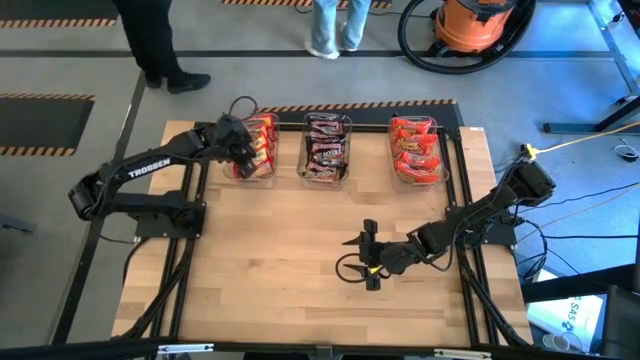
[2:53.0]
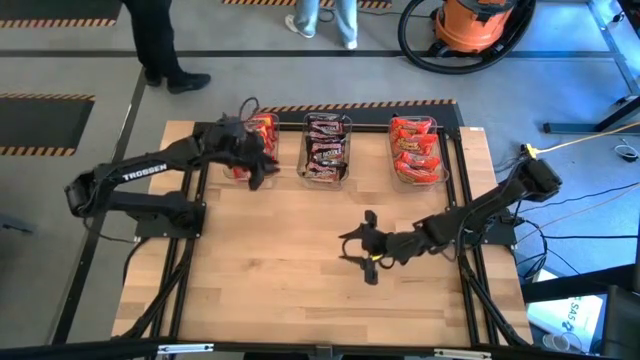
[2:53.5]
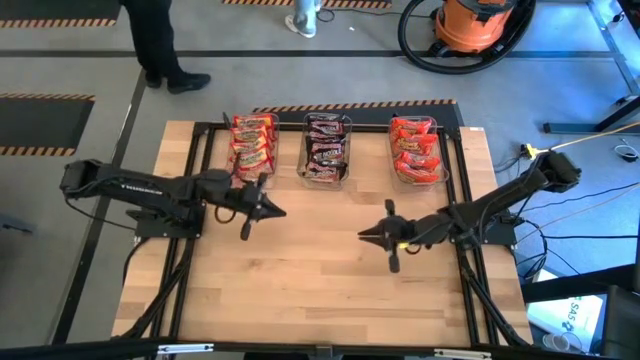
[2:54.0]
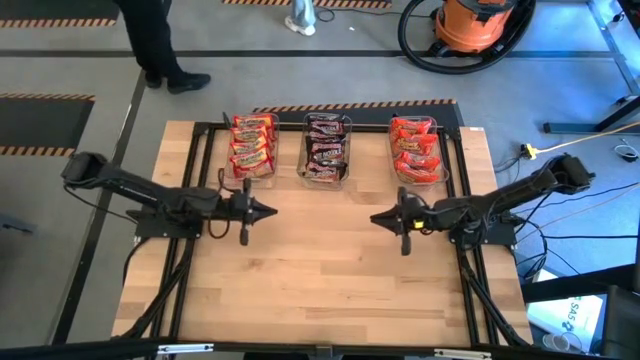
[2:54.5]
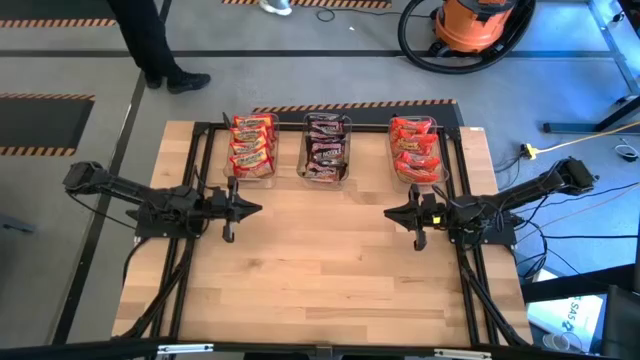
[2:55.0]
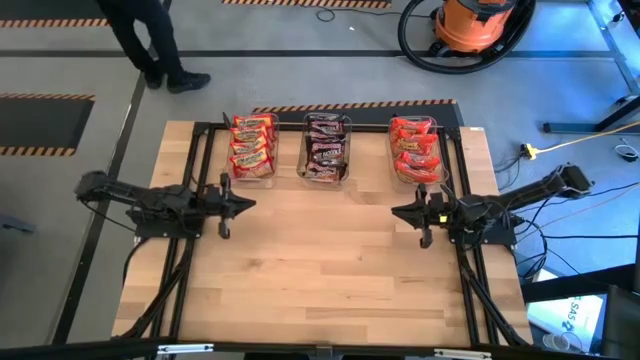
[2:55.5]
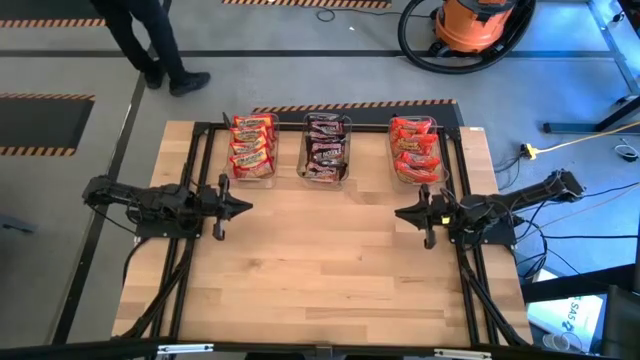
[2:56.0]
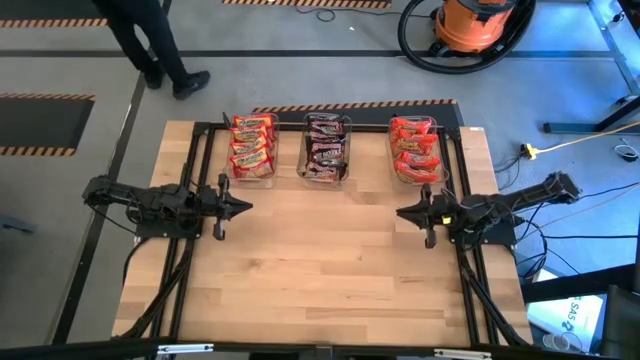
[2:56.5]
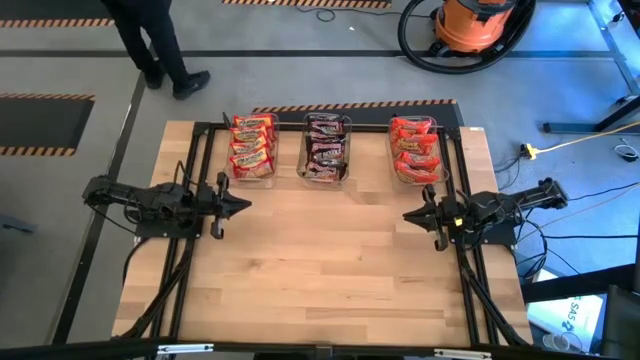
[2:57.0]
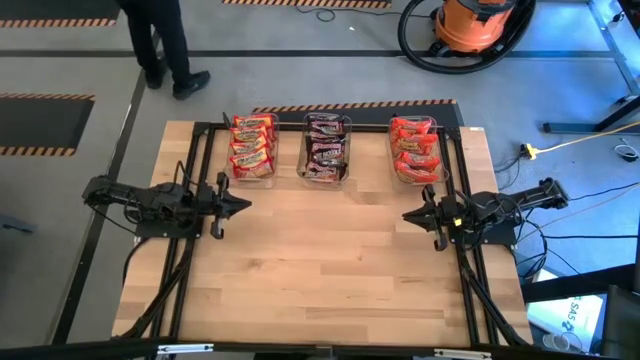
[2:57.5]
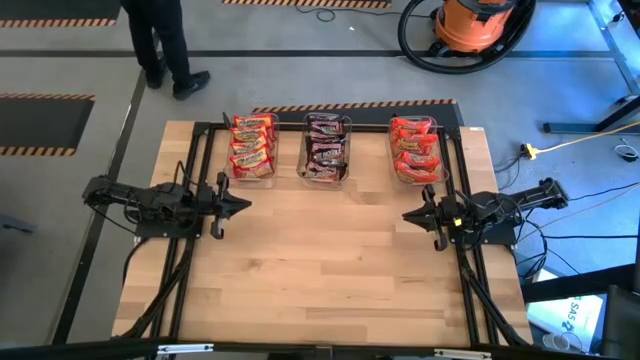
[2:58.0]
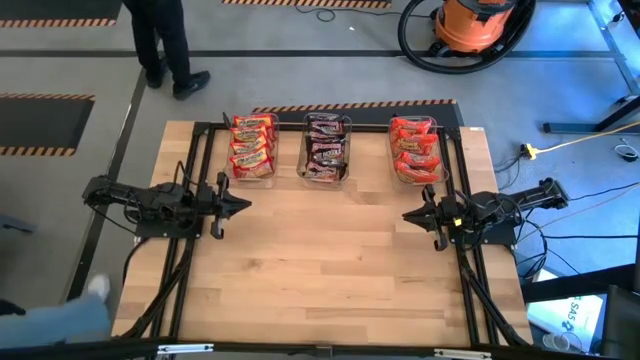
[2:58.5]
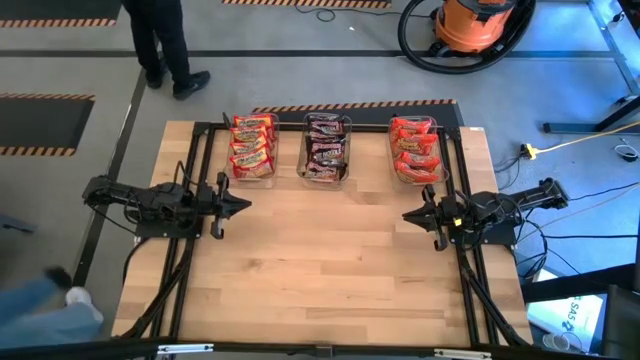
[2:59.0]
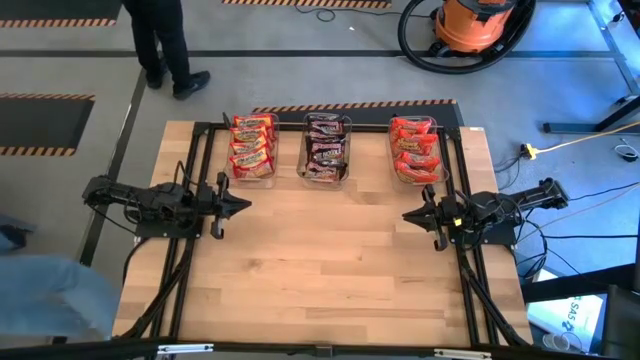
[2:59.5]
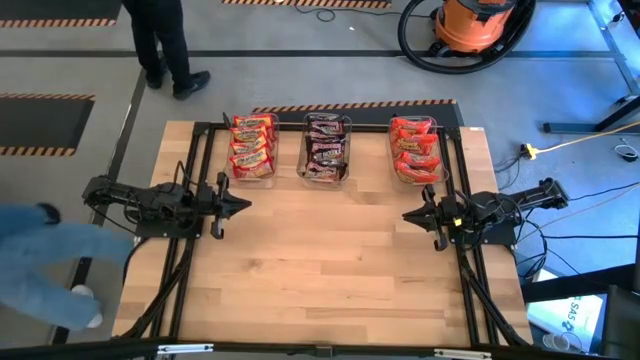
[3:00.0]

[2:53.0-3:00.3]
Task: Sort Maruchan noodles
Return to Home Position

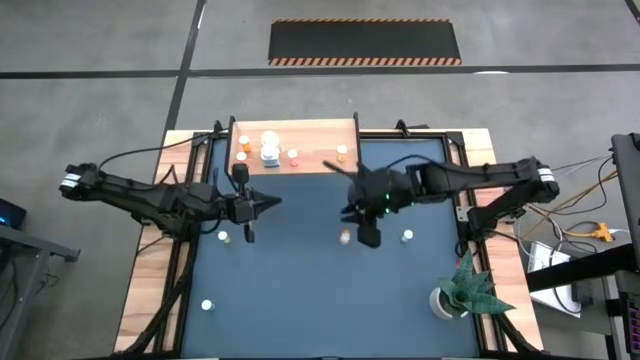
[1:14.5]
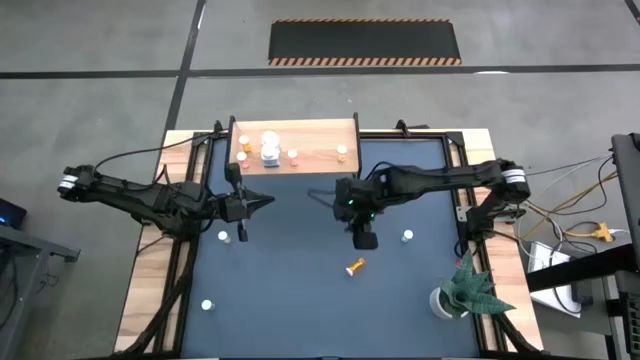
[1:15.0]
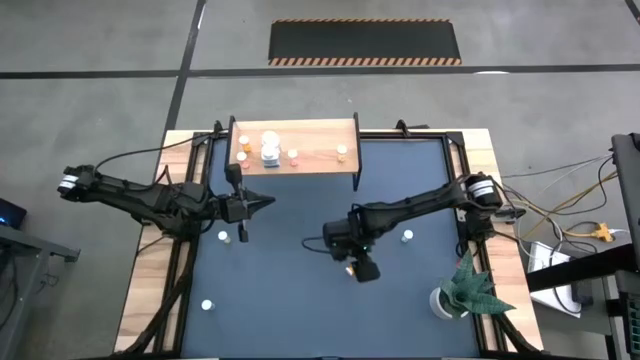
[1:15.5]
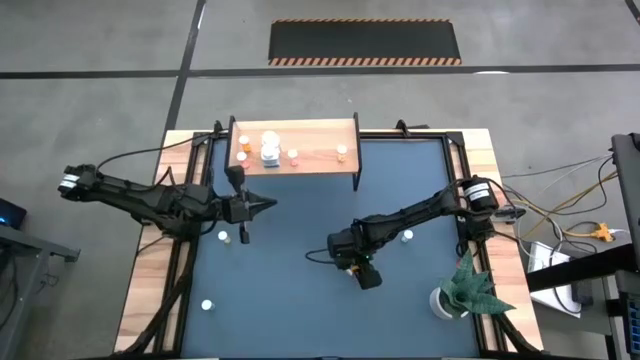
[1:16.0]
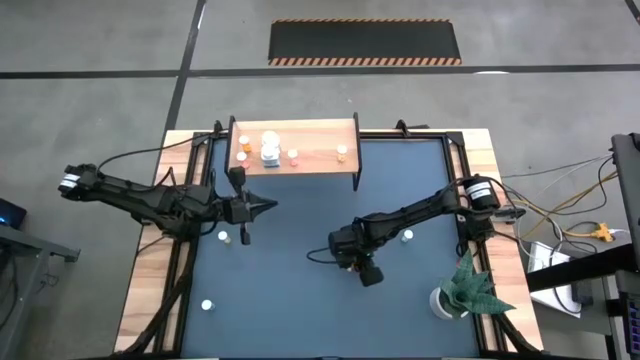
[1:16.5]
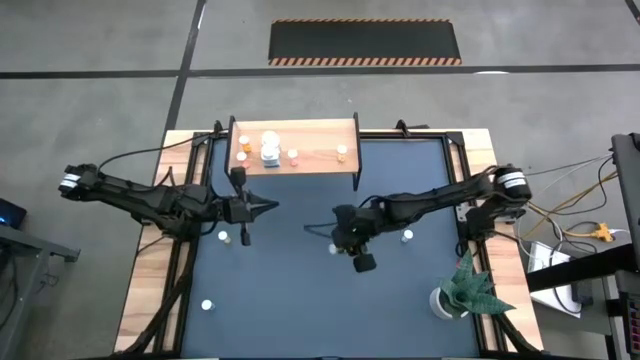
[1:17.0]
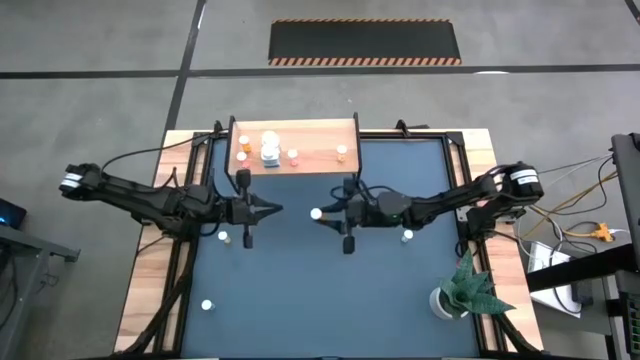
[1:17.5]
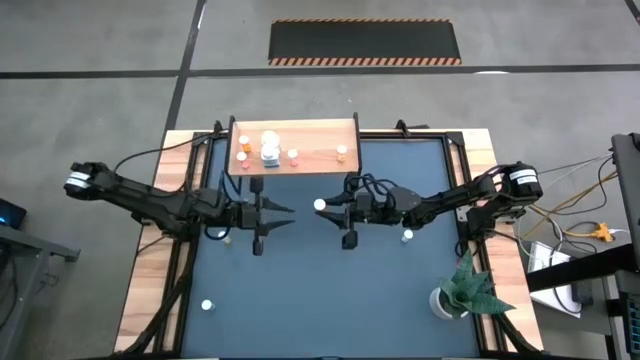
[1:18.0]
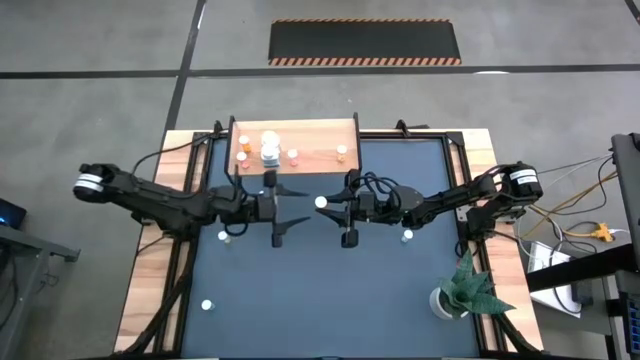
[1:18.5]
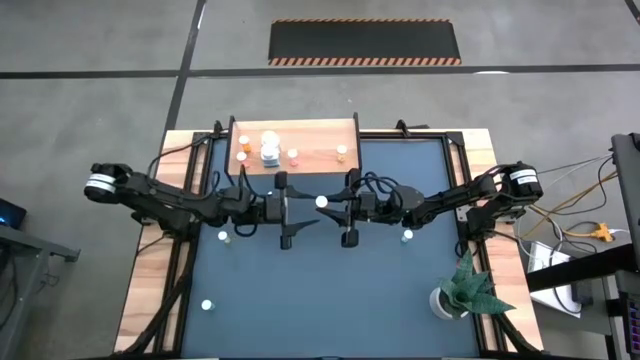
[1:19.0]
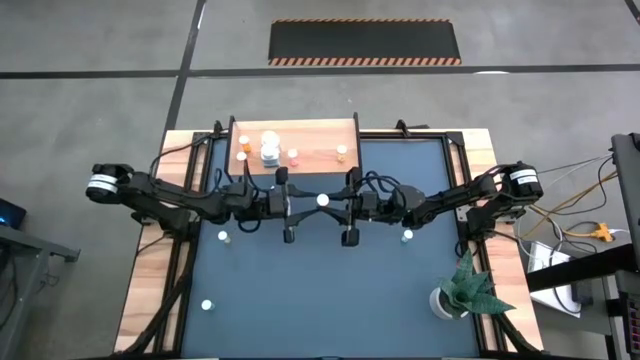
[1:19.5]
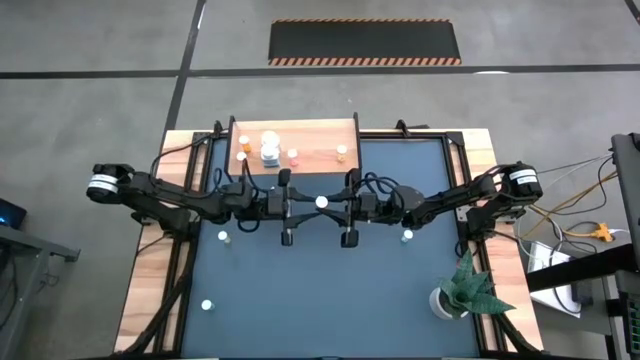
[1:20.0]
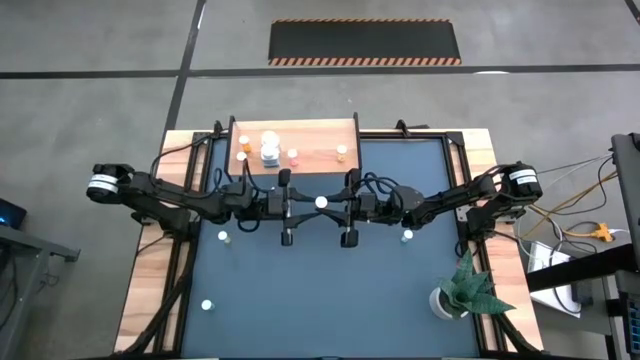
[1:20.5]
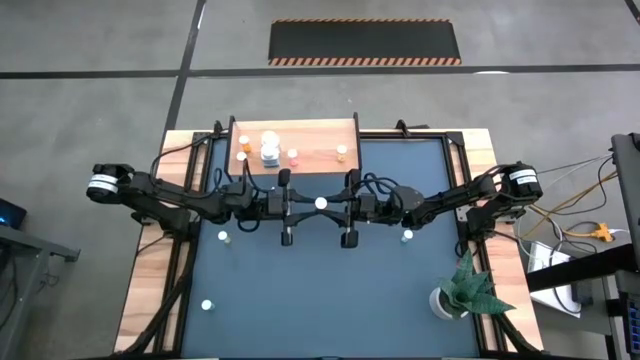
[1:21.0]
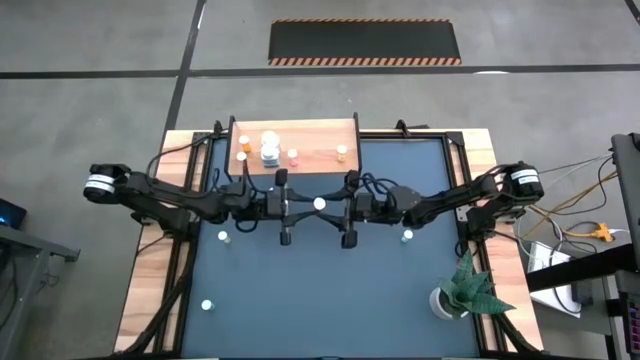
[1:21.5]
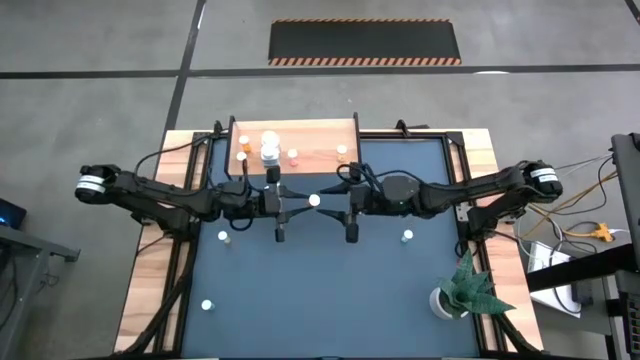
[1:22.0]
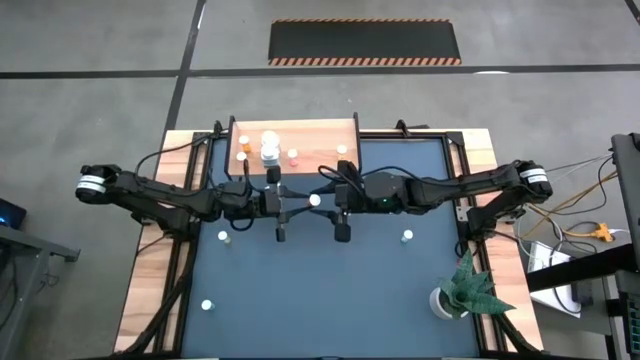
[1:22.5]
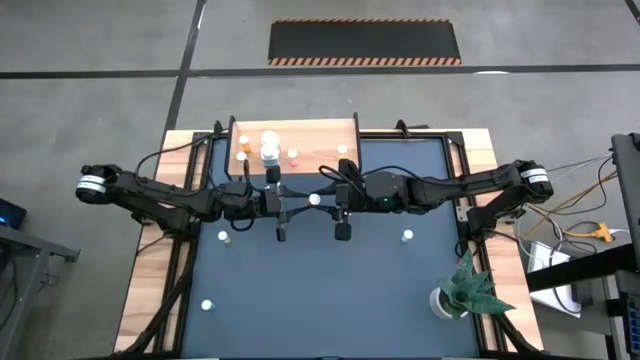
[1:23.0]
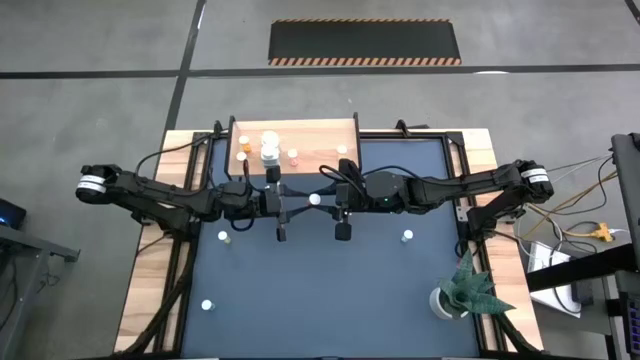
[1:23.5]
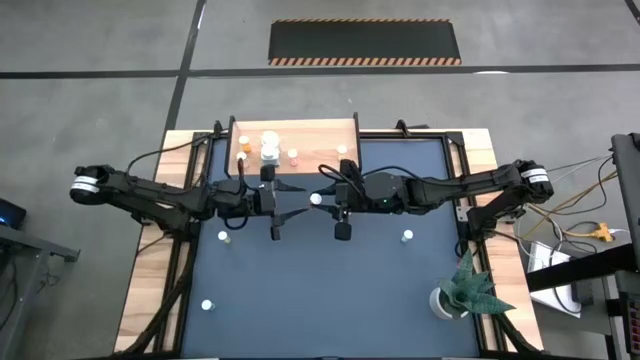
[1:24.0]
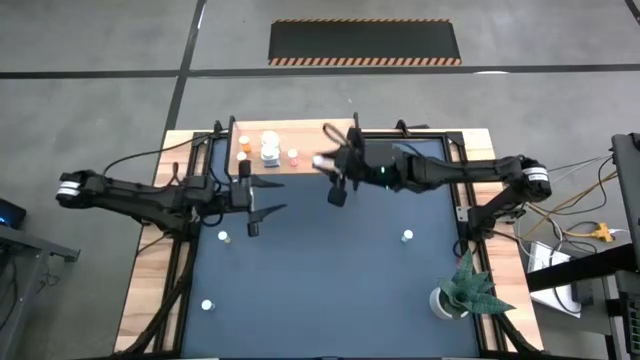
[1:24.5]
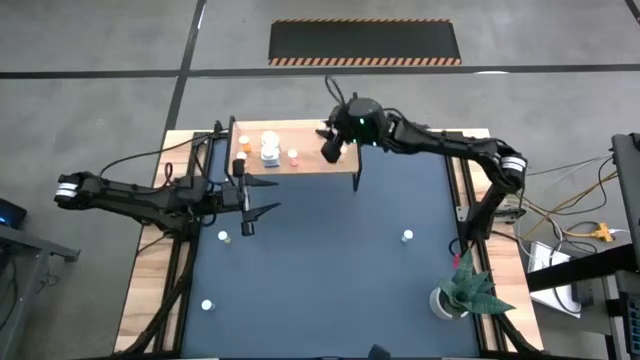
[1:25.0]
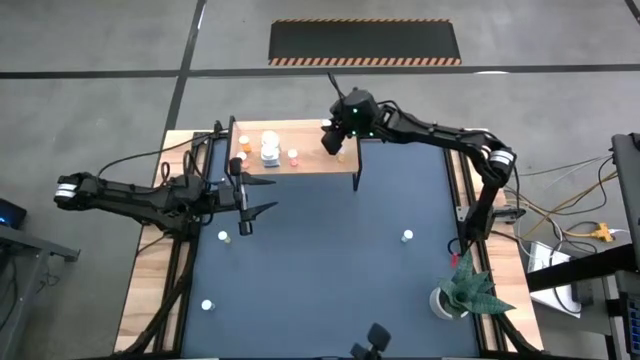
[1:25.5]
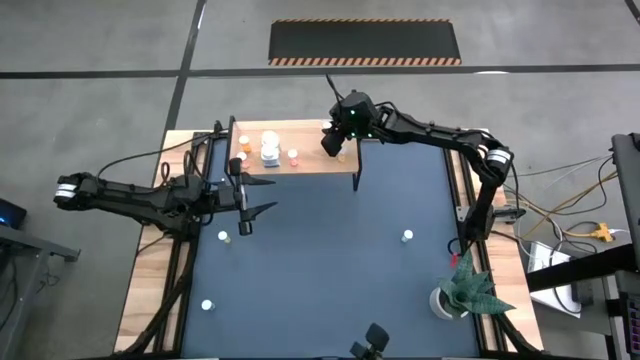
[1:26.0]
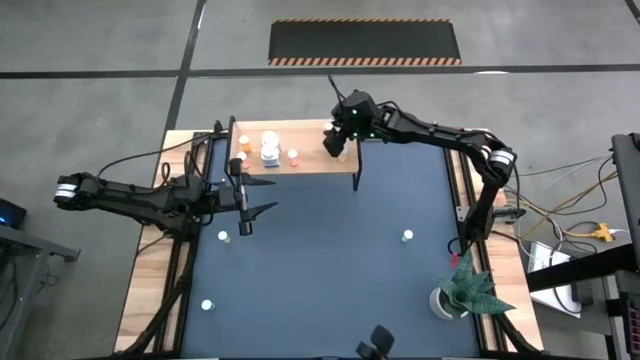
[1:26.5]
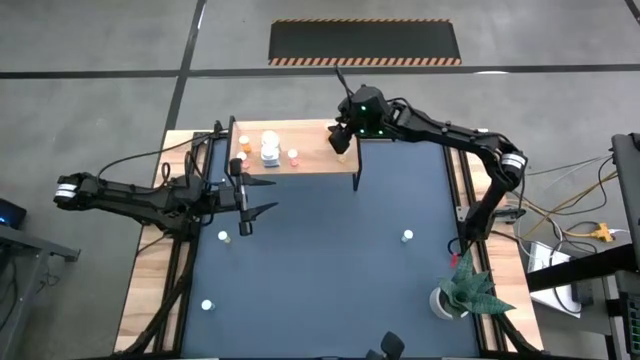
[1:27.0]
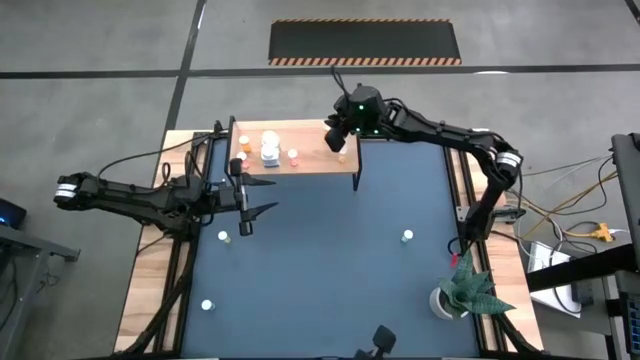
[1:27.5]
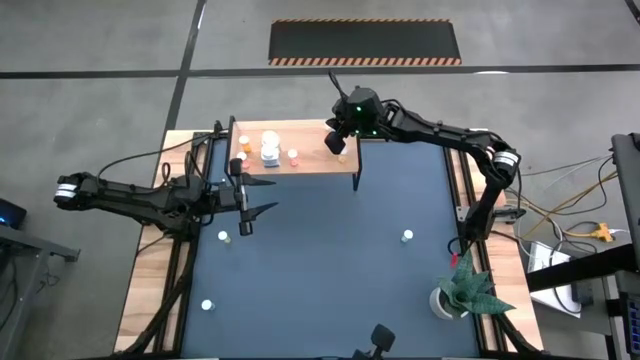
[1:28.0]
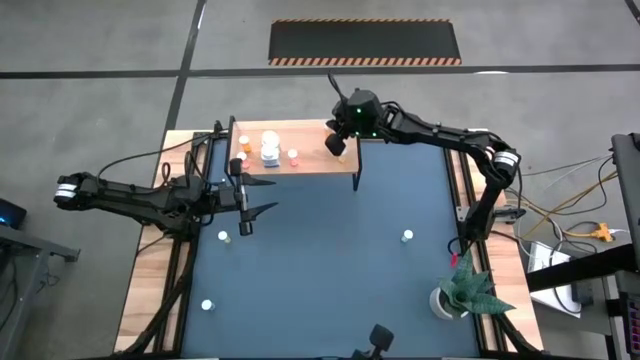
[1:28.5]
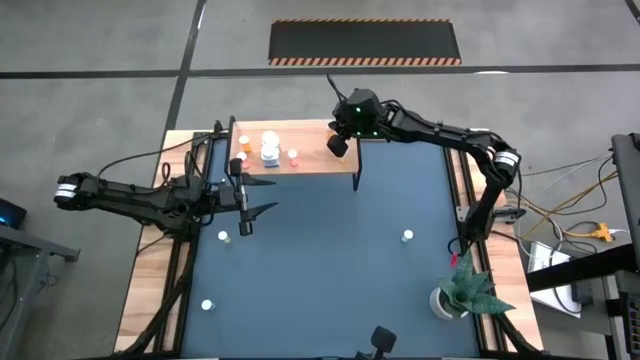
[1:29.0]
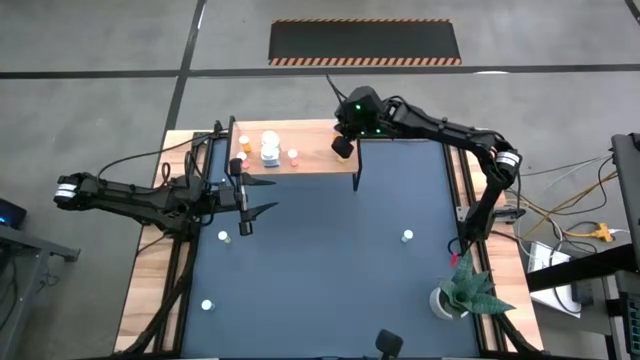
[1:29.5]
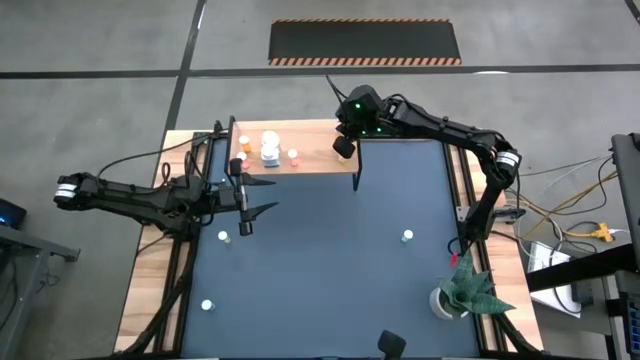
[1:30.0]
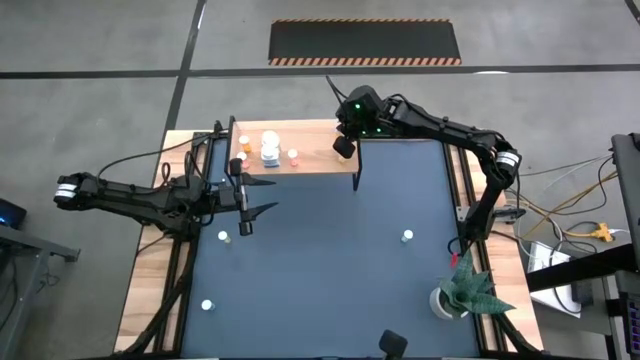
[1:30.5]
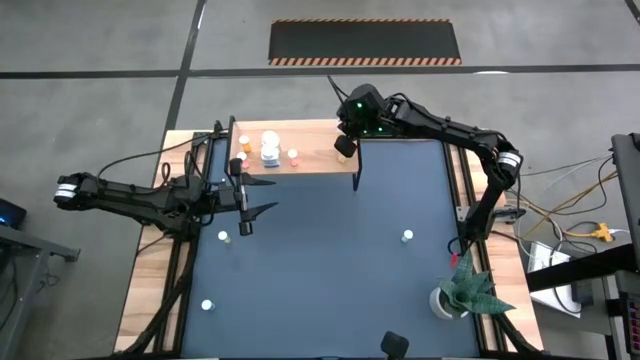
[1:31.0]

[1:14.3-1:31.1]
Task: Pick and place medicine bottles onto shelf by color
Put the orange pill bottle on the shelf
